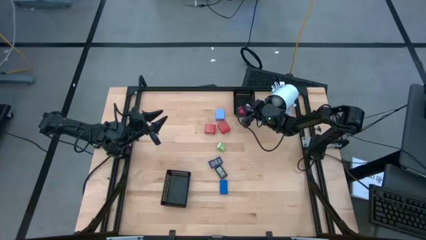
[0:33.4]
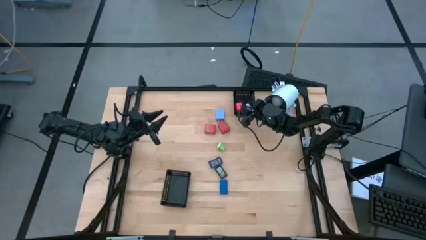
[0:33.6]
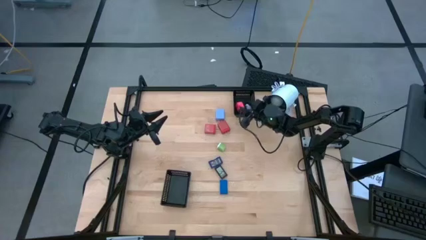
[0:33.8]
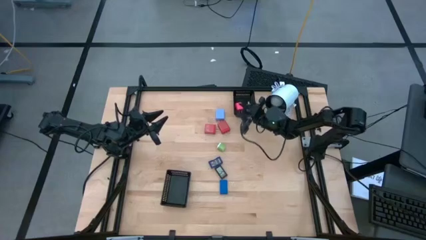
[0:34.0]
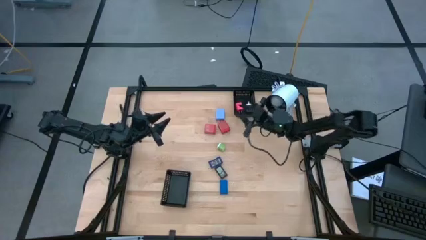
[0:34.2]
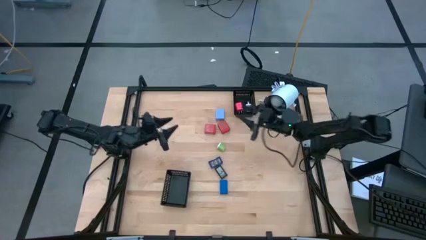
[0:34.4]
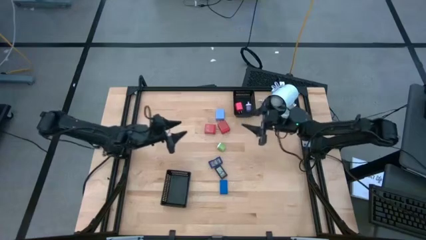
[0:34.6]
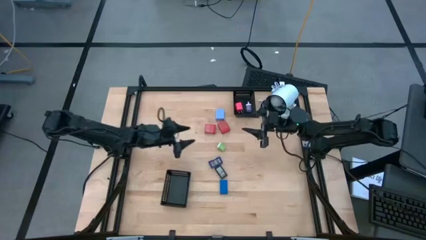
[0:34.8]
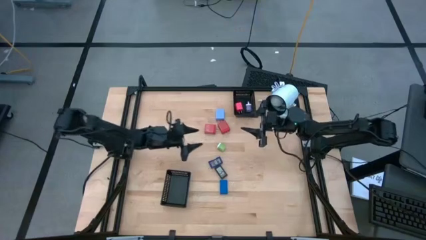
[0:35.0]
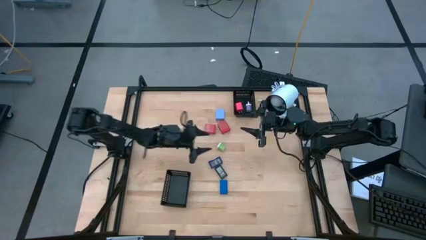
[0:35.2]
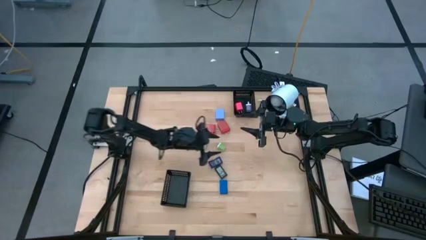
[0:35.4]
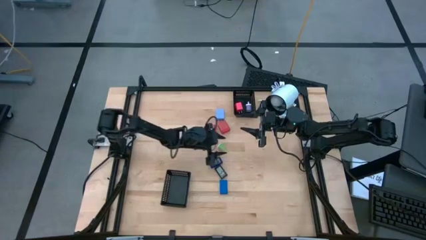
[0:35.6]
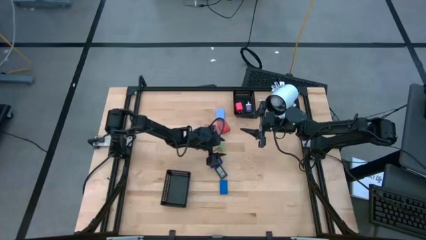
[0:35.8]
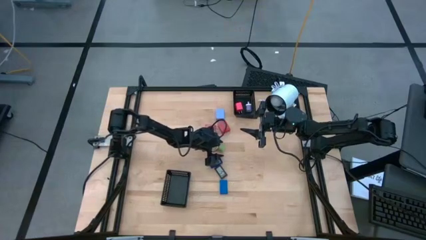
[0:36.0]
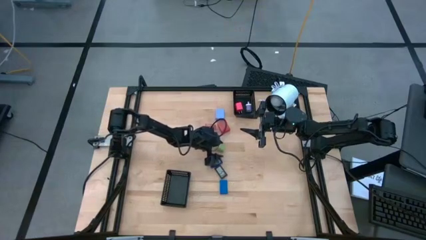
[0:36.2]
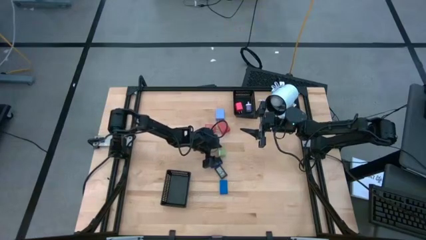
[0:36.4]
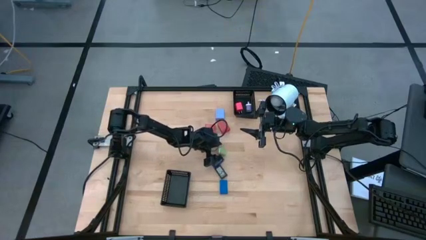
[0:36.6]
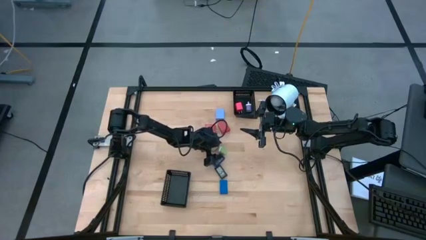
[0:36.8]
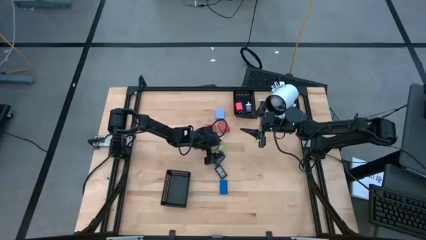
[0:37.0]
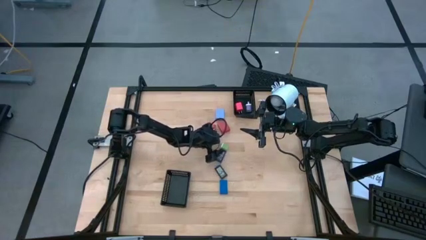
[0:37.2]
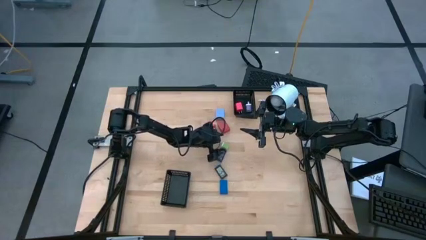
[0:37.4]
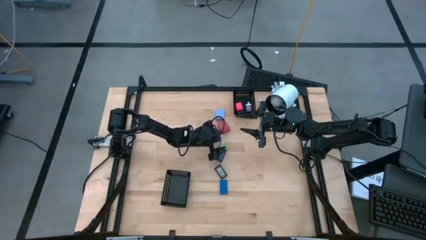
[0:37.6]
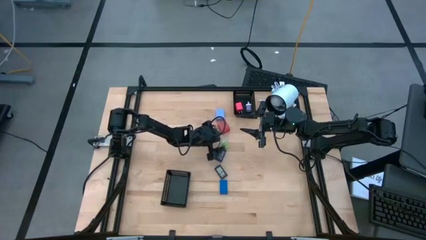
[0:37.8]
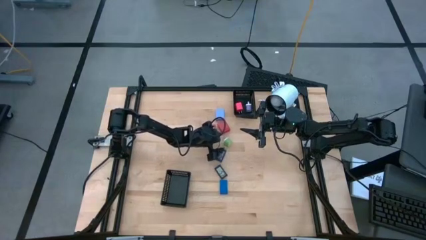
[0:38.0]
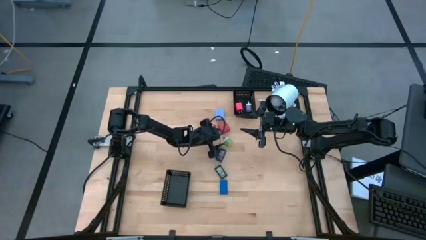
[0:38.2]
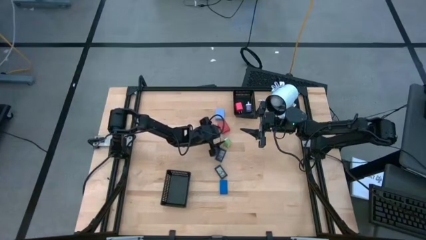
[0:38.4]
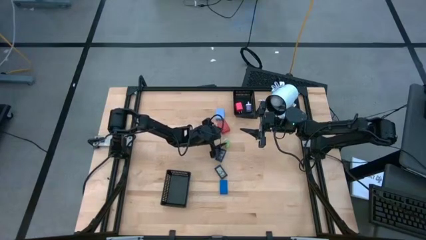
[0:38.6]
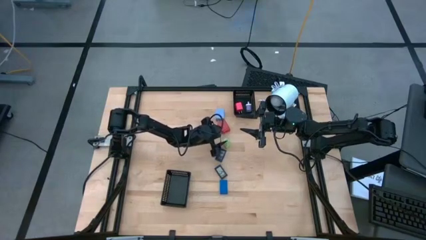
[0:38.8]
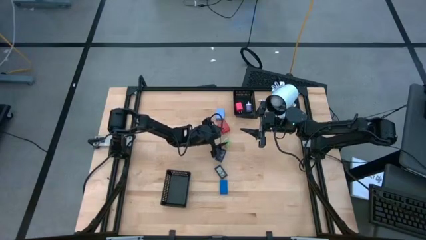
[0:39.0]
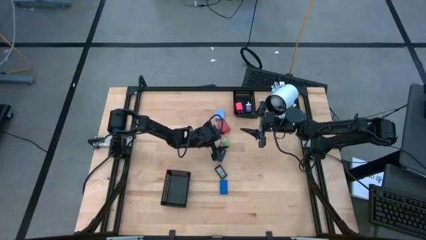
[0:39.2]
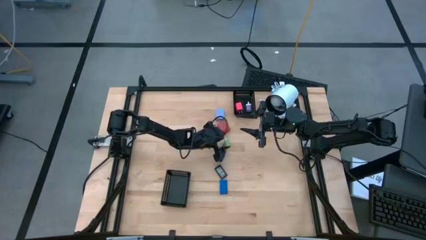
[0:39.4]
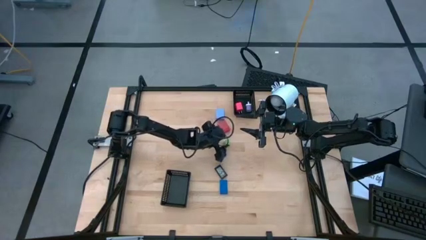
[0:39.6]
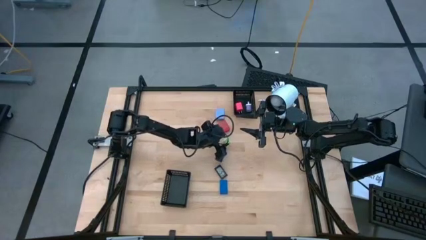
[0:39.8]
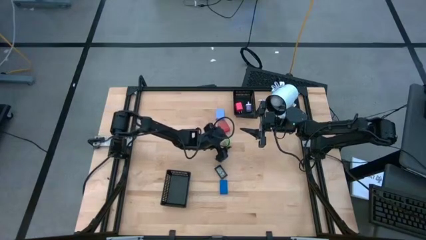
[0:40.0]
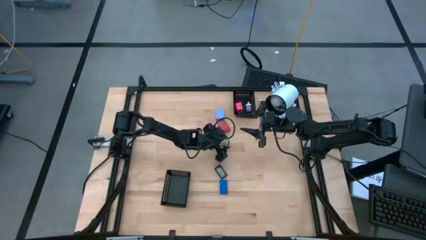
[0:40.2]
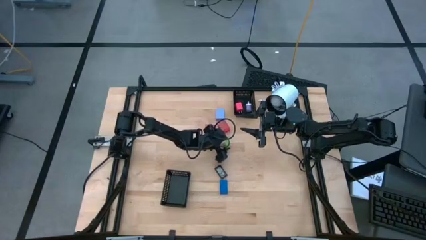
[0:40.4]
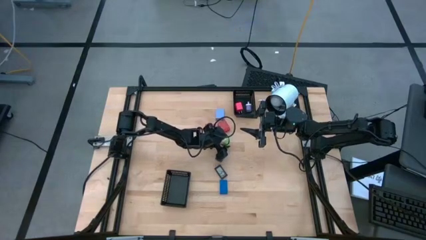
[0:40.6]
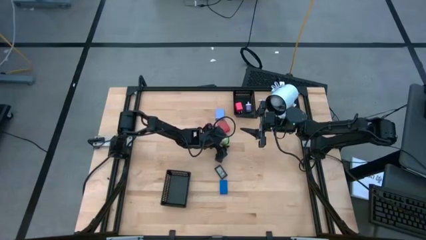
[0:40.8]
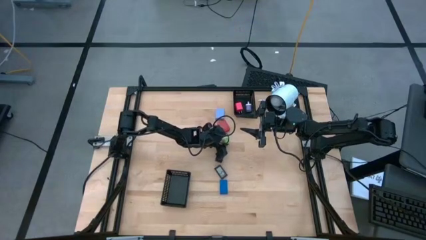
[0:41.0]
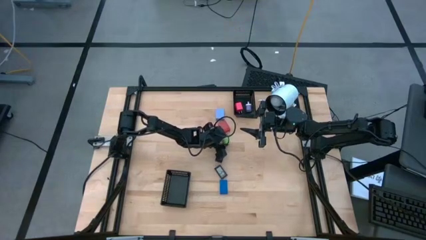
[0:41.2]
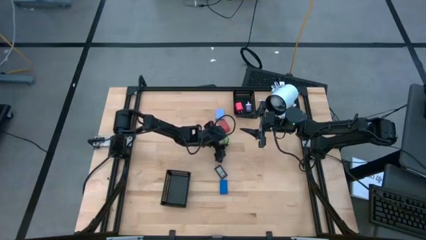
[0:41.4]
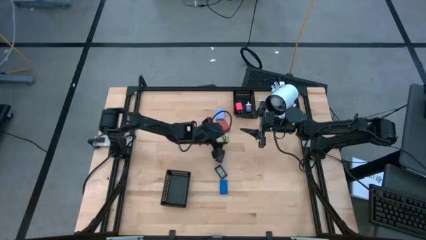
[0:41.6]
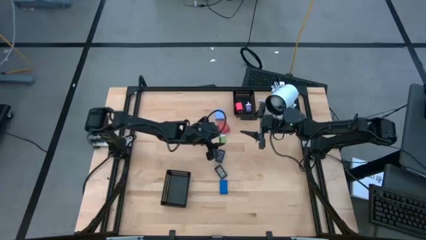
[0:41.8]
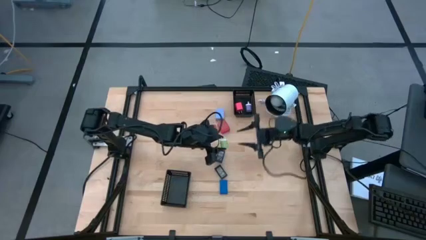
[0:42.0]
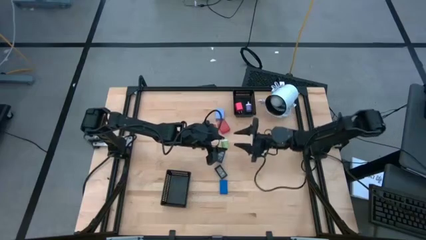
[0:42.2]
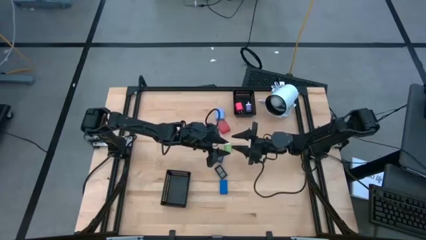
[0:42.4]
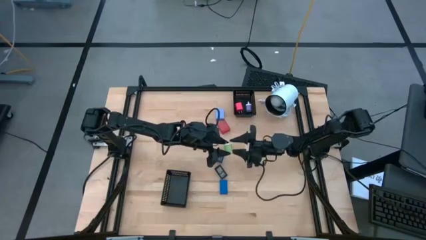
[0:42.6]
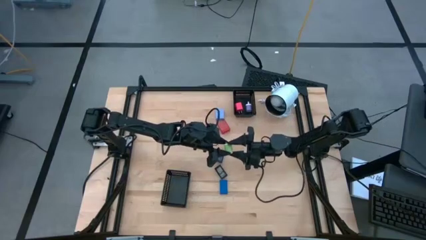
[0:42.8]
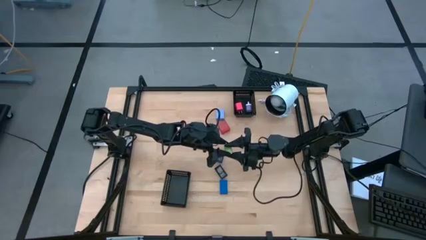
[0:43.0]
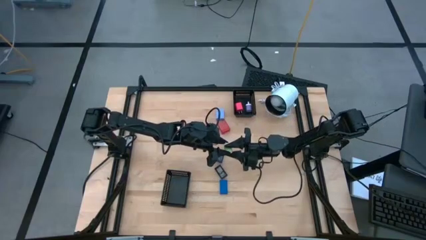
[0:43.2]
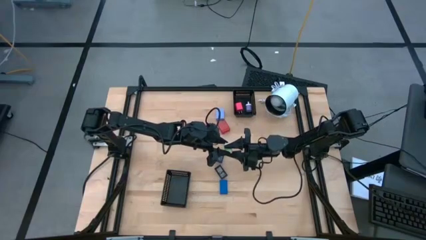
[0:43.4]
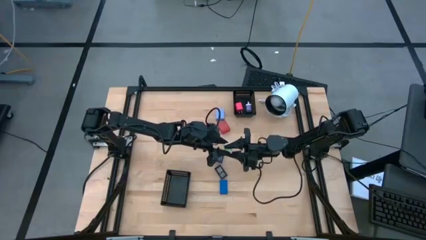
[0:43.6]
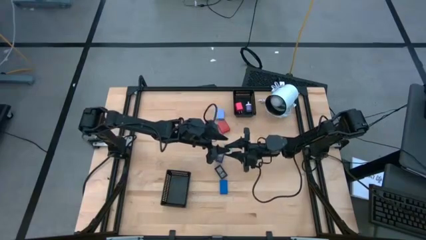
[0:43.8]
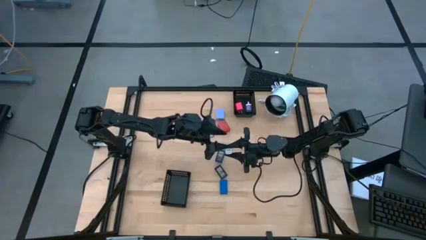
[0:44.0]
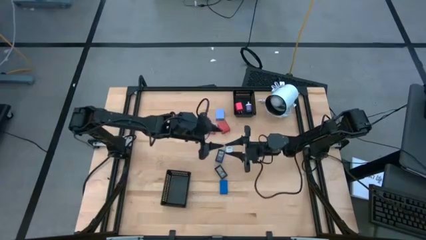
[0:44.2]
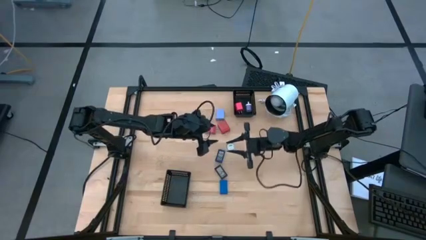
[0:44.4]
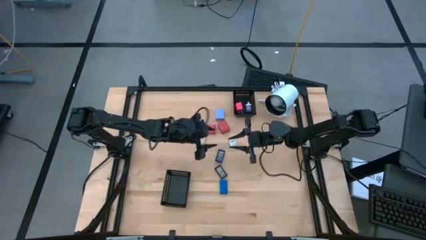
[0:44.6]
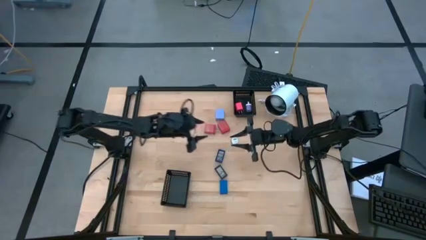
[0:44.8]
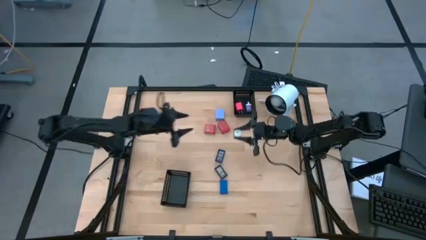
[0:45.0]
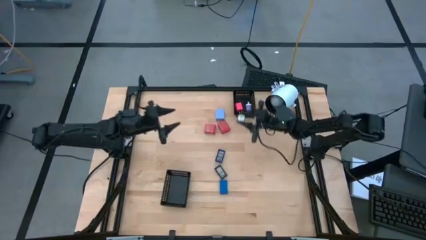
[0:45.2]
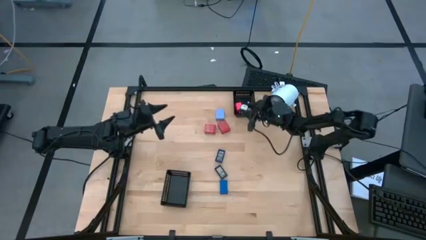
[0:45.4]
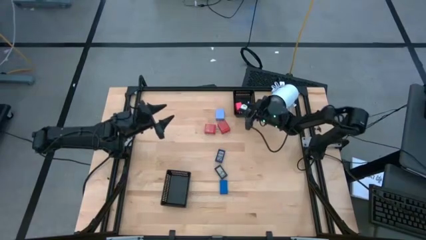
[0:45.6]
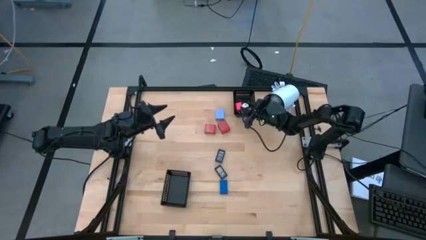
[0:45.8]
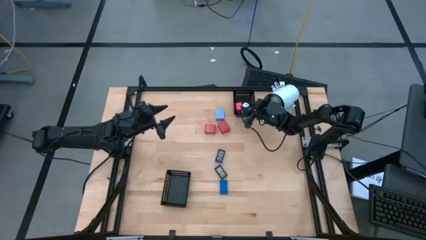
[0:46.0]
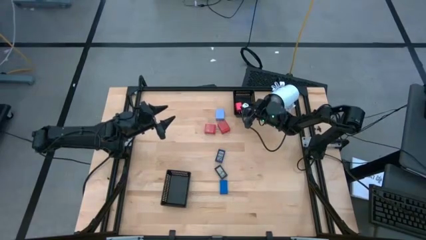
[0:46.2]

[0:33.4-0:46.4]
Task: Pick & Place Office items
Put the green charger adapter into the top black basket

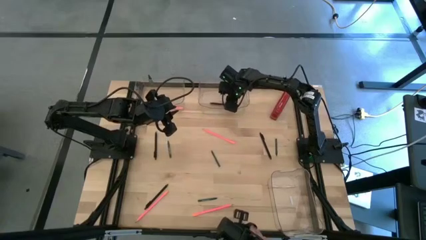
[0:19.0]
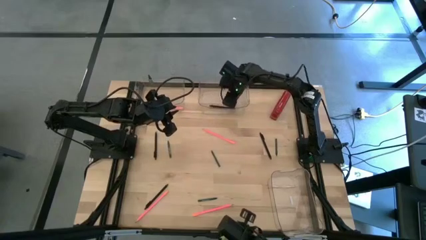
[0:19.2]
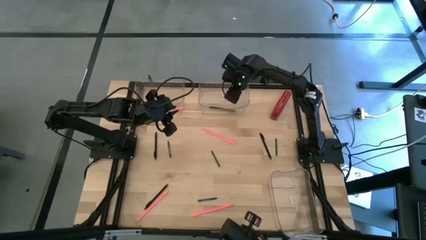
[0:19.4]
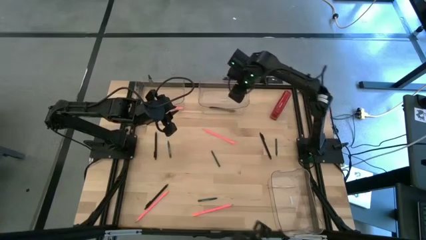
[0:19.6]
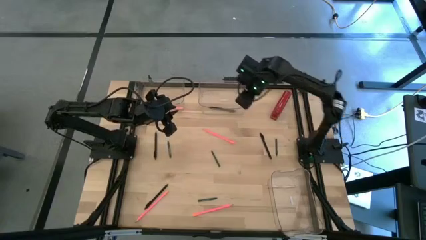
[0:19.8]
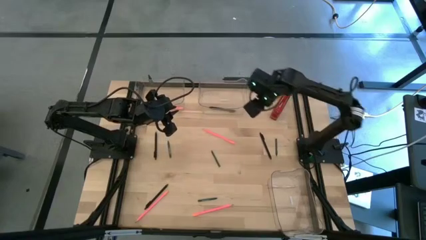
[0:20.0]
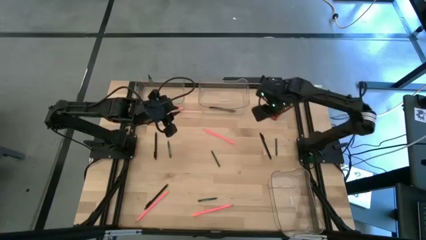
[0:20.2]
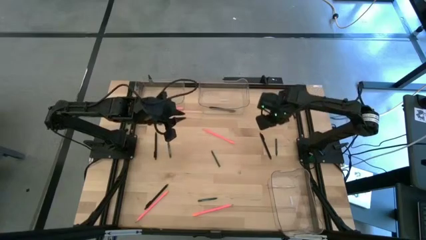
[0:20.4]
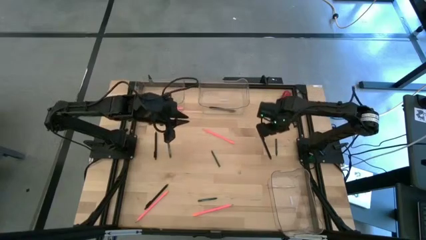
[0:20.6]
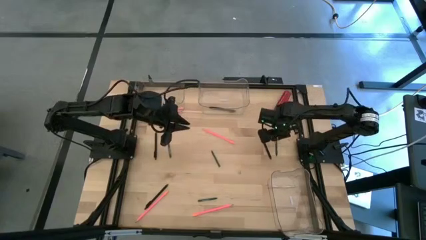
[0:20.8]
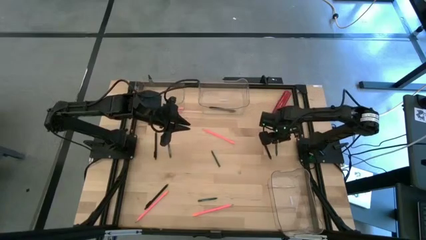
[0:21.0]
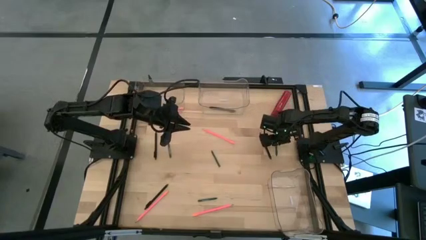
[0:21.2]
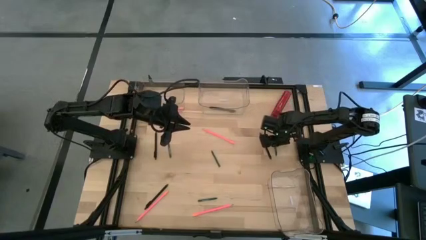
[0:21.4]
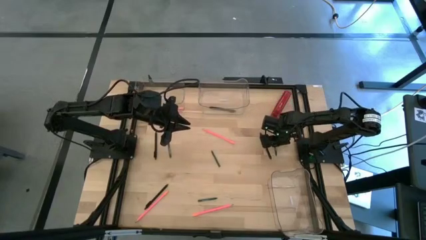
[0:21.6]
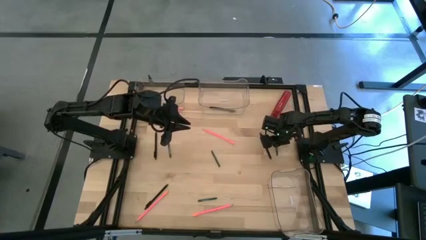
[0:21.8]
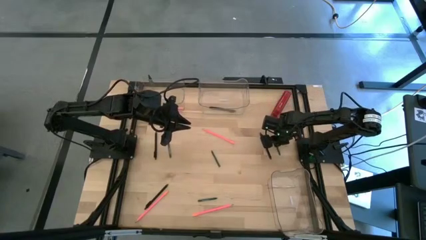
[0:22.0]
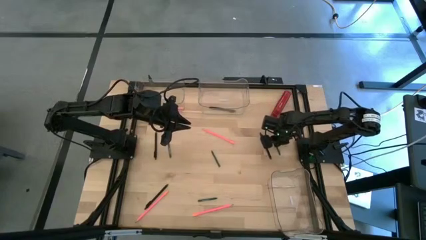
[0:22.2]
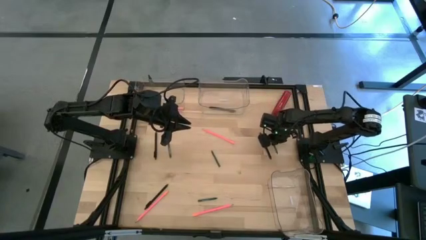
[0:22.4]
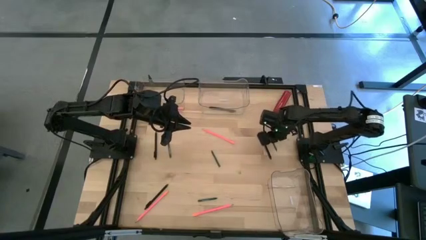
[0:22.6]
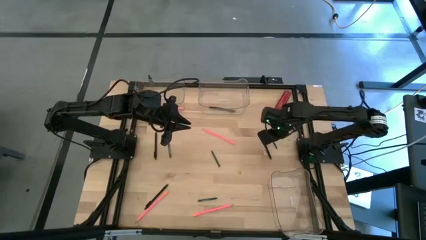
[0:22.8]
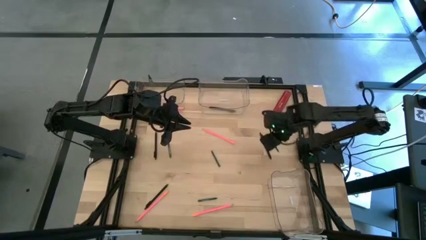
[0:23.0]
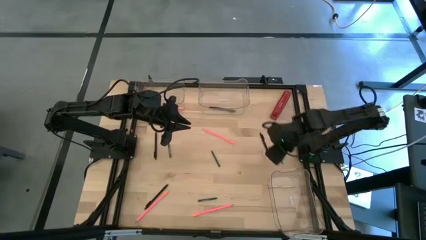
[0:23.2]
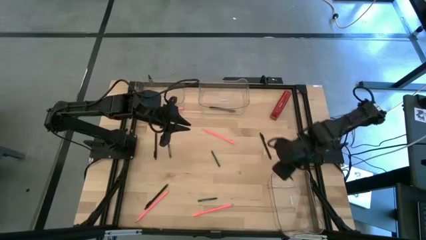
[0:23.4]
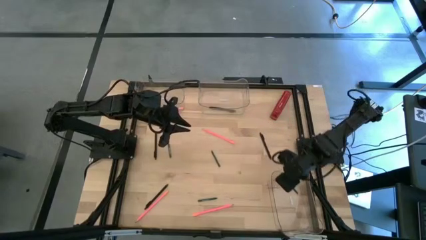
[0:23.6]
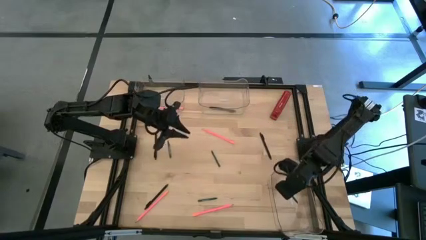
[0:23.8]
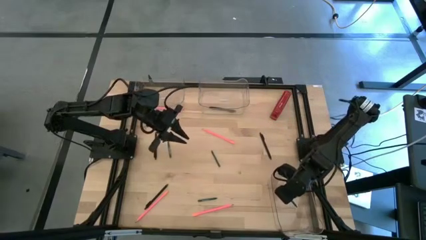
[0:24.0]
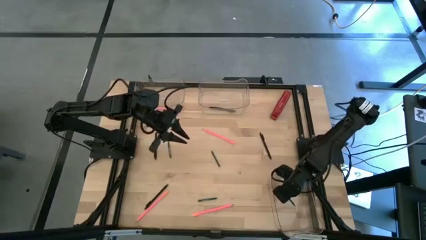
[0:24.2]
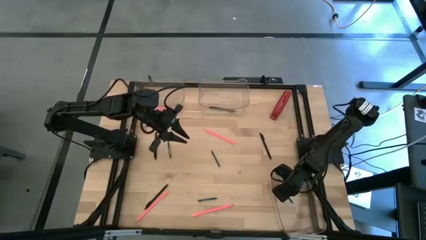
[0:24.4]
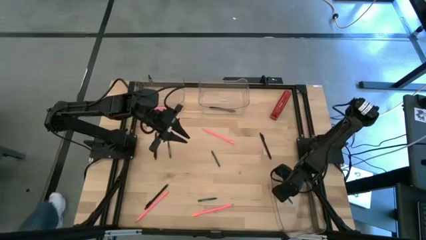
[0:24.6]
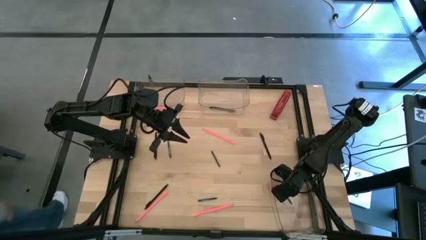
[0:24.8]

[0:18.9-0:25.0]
Task: Sort crayons/erasers/pens/pencils in bins
Put the green crayon into the bottom transparent bin
